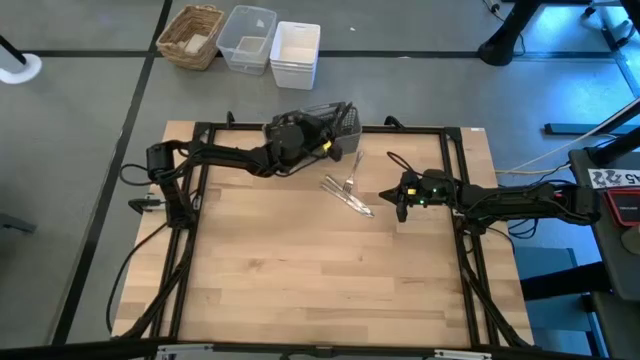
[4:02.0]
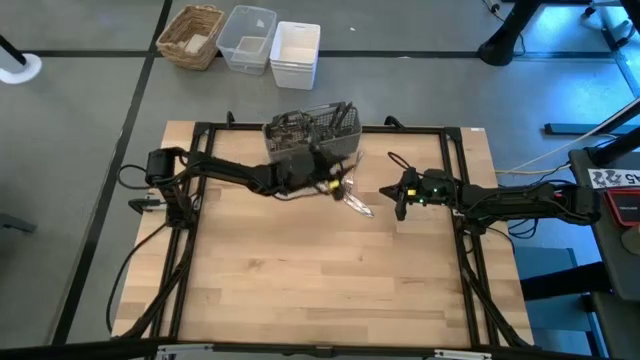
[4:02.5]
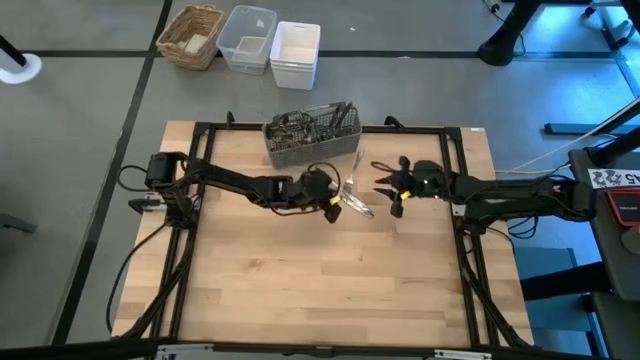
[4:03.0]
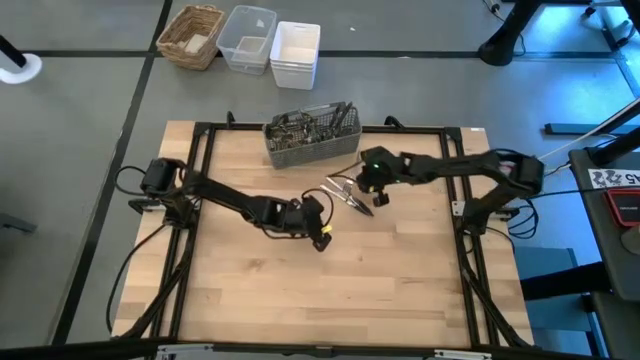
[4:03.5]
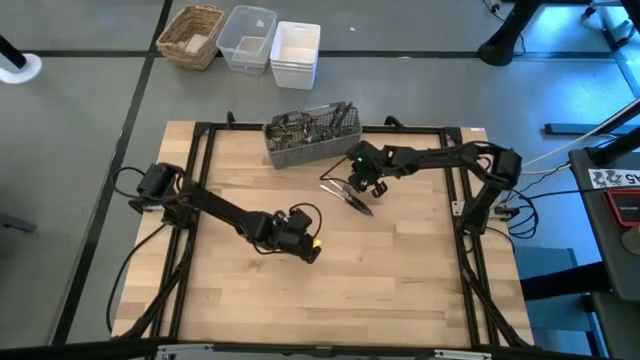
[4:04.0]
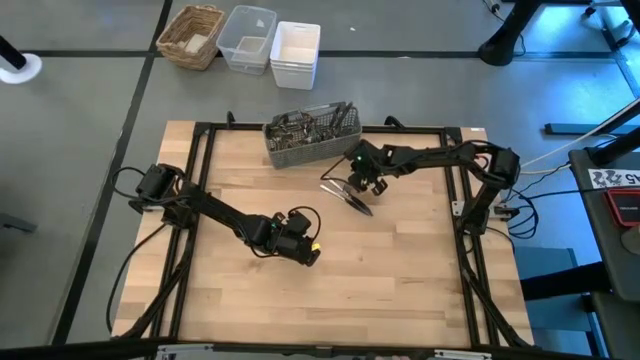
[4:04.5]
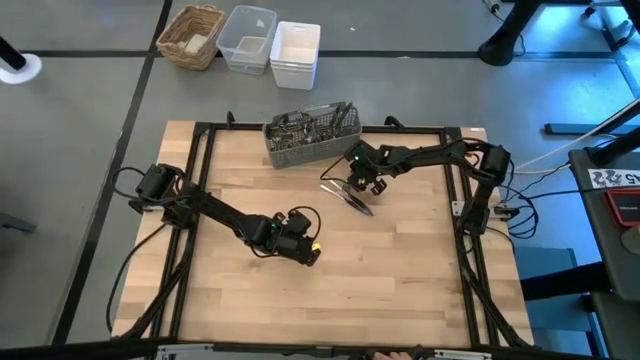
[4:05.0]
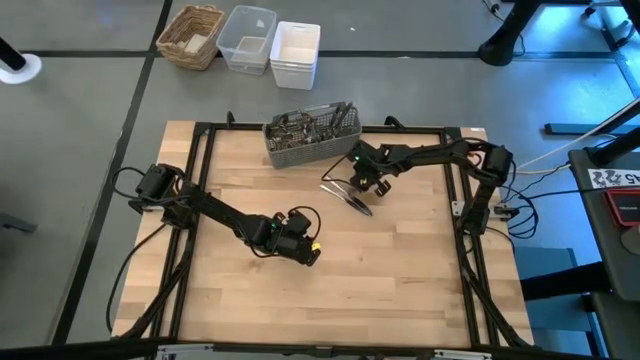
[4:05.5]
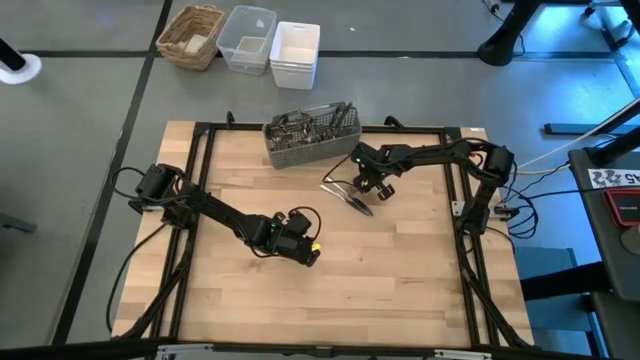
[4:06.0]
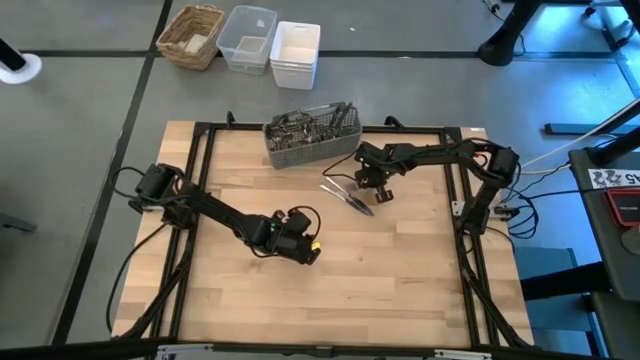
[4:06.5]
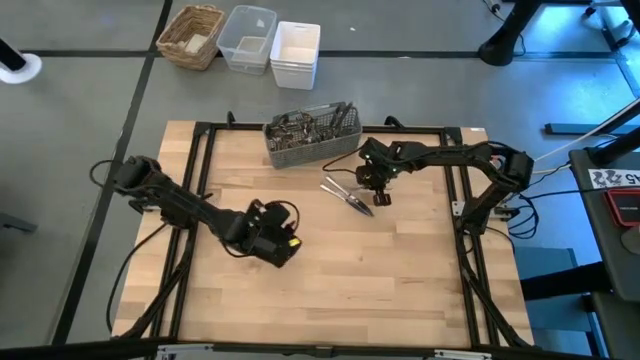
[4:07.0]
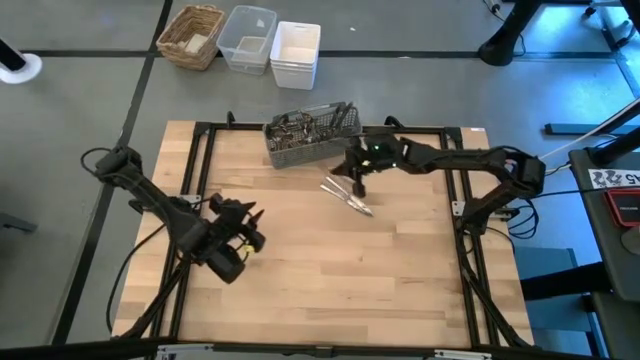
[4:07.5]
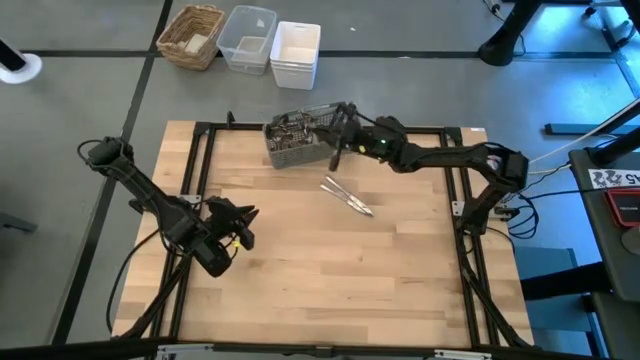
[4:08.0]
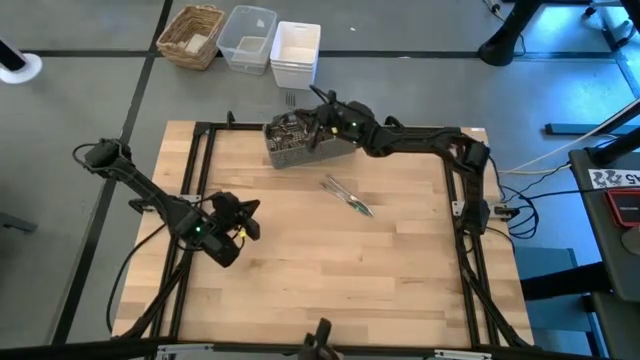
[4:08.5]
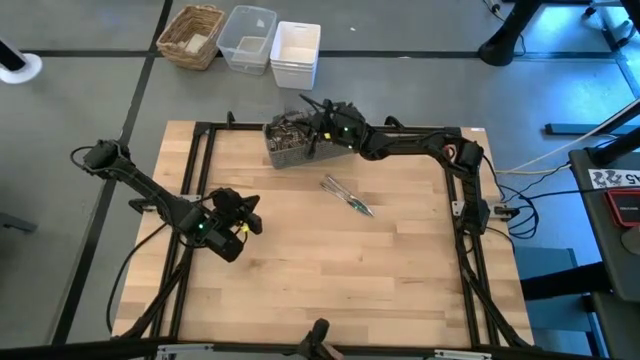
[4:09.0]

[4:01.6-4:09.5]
Task: Sort silverware
Put the silver fork into the silverware rack

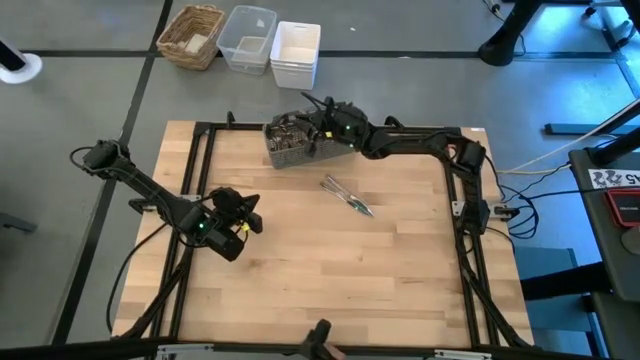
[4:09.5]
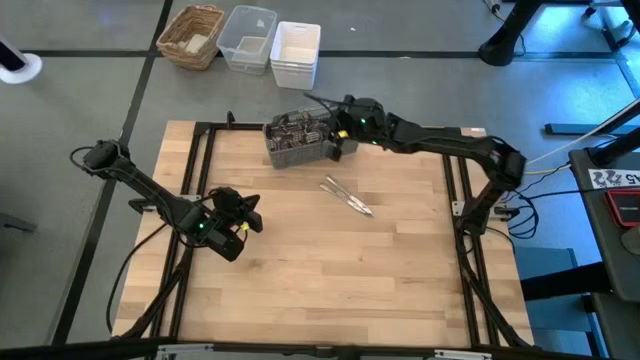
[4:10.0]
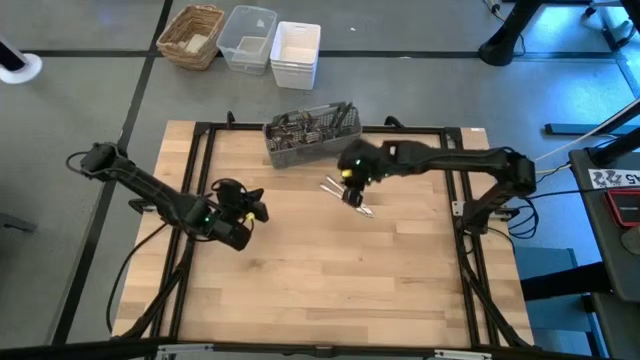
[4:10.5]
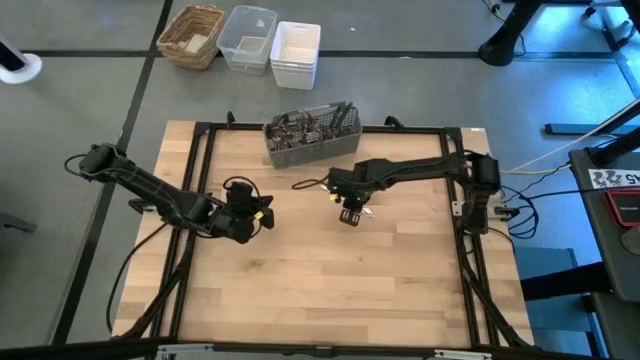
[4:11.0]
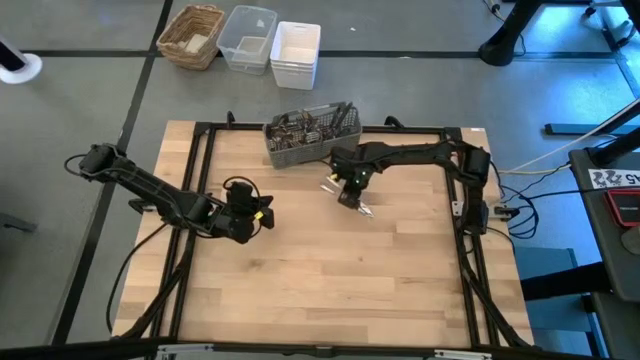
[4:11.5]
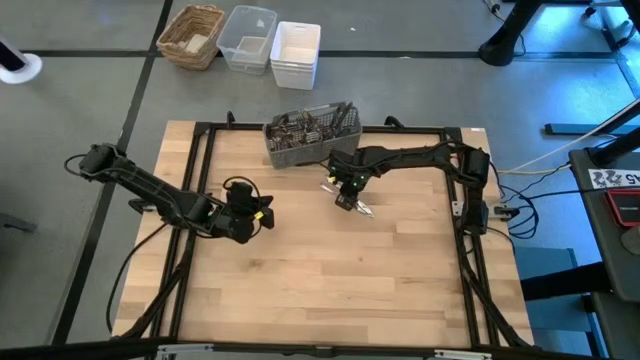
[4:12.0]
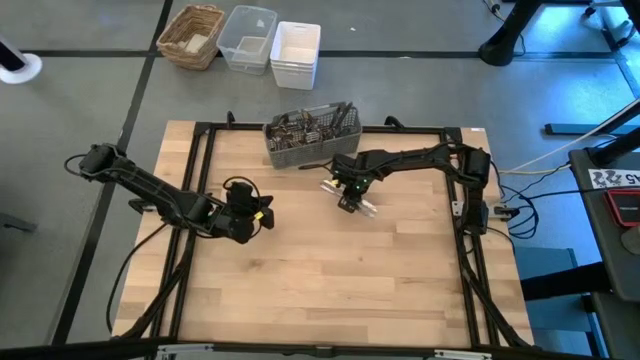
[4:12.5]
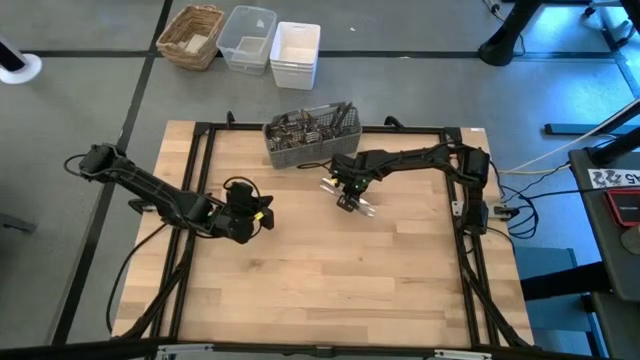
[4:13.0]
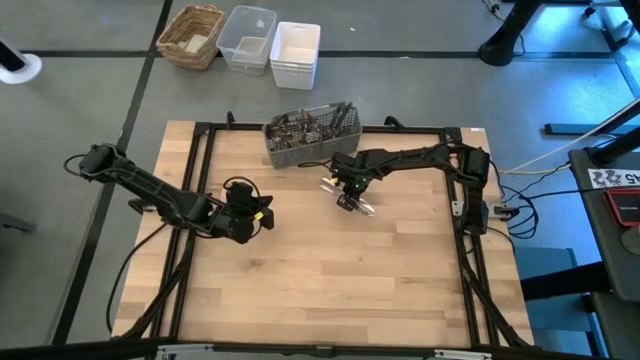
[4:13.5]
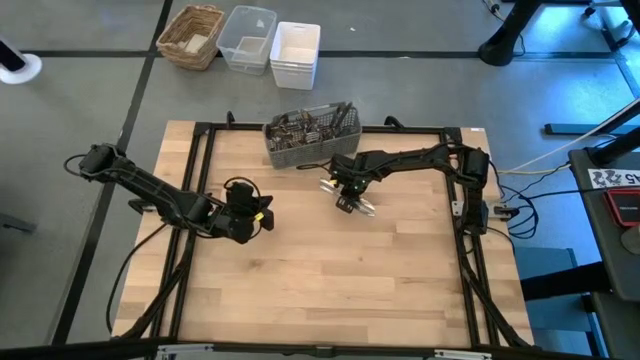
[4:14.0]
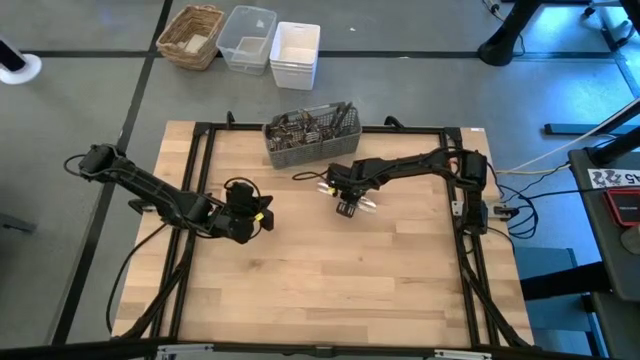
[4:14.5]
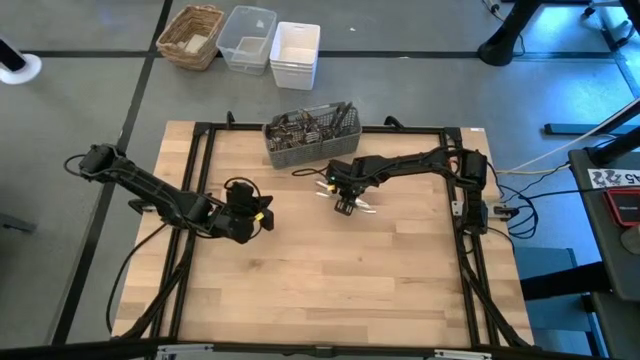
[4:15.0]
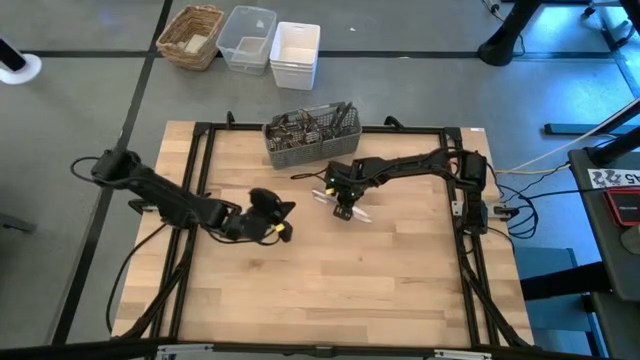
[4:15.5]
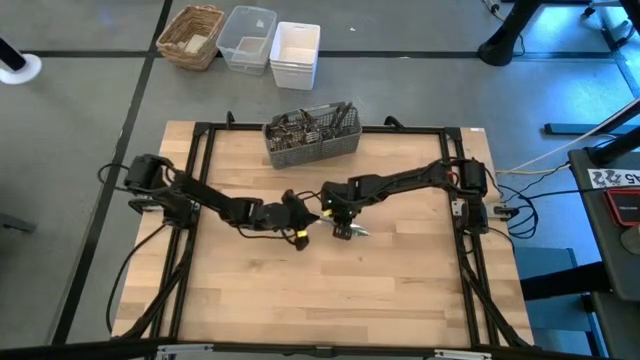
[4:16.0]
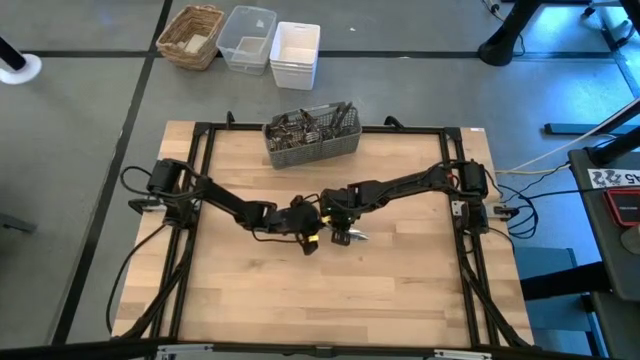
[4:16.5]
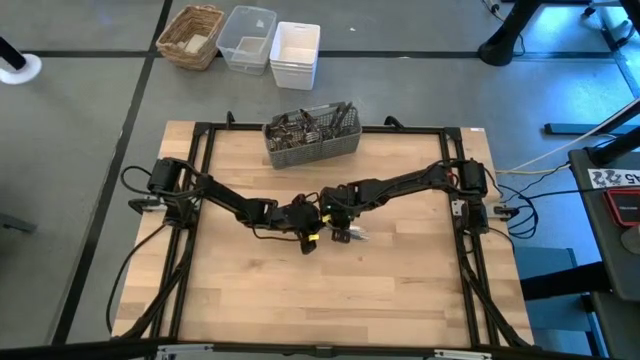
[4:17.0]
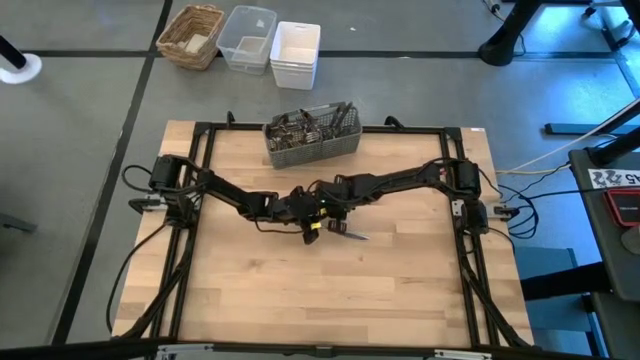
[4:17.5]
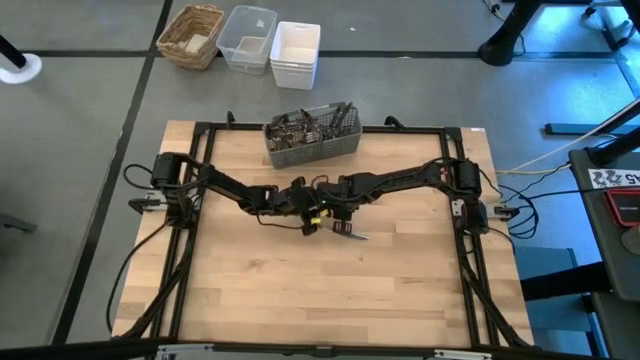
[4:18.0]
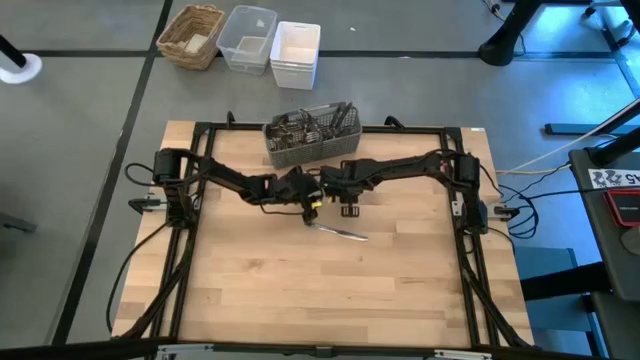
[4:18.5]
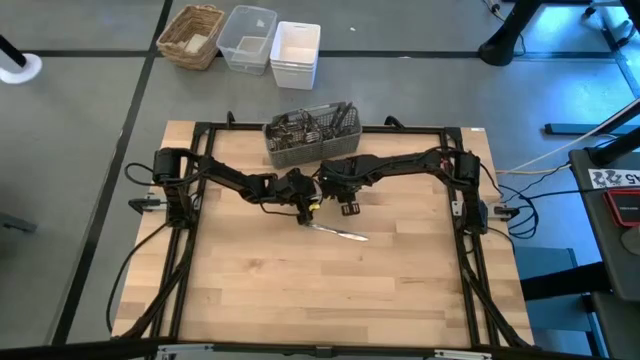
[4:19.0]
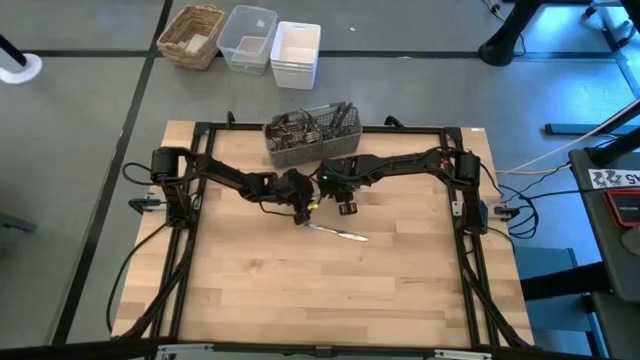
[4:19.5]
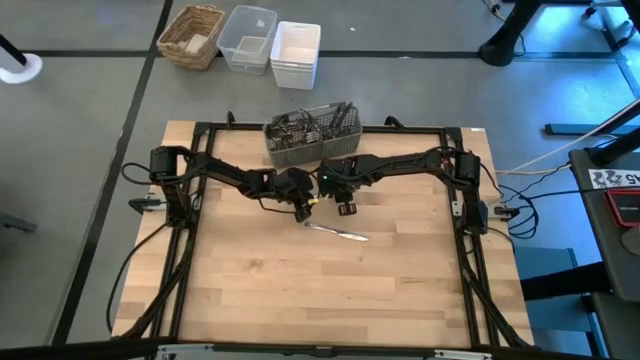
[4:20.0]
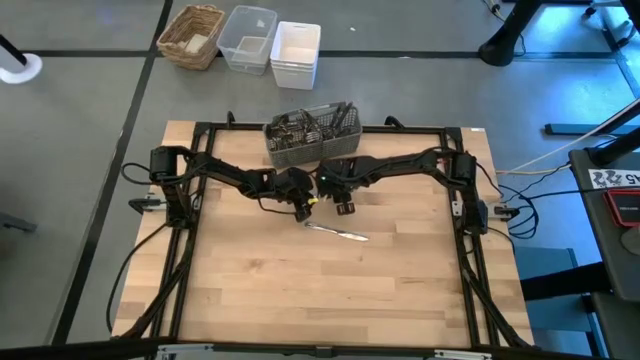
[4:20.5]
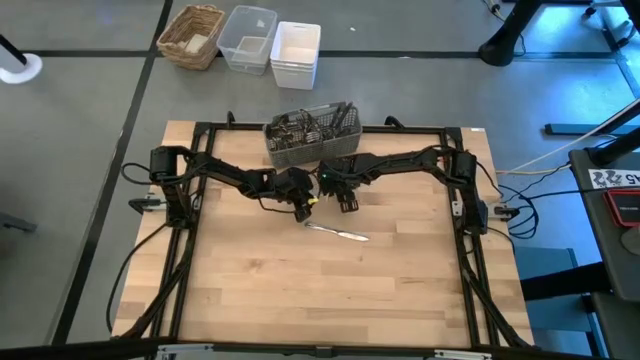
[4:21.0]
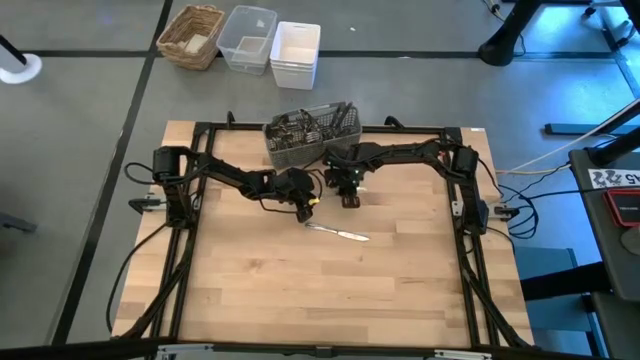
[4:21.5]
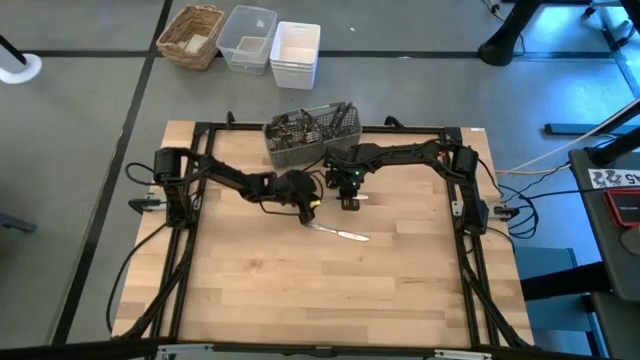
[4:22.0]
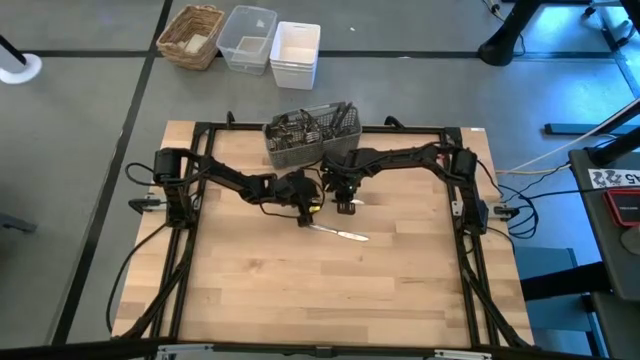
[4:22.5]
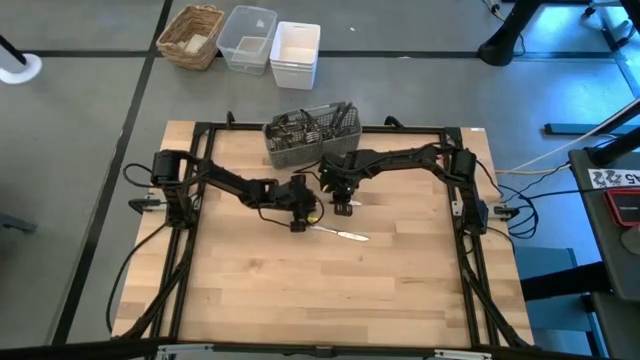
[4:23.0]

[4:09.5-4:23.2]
Put the silver knife into the silverware rack

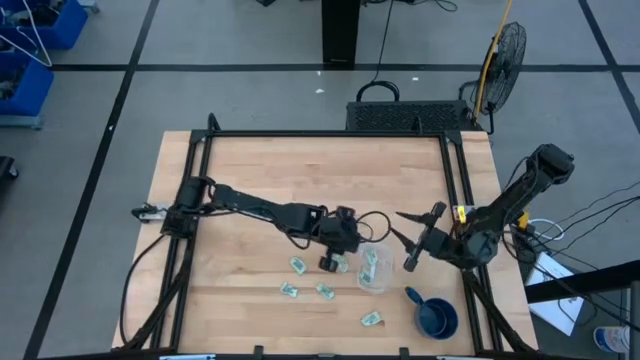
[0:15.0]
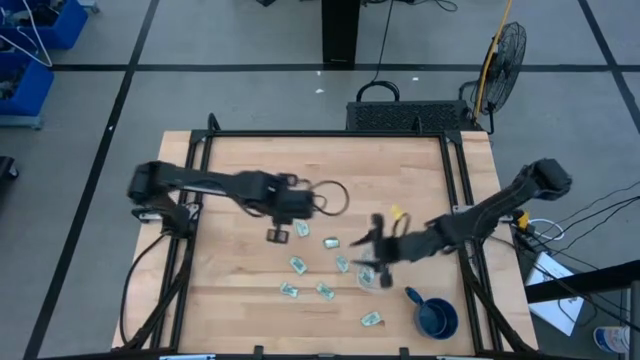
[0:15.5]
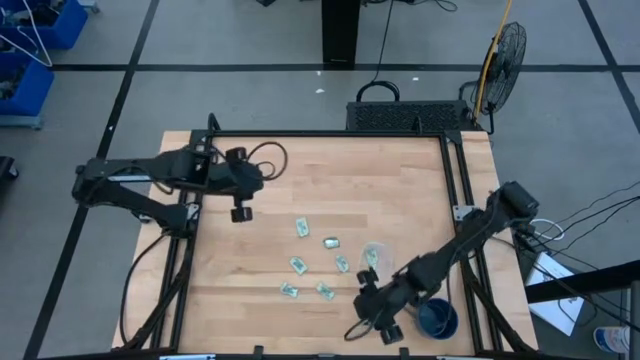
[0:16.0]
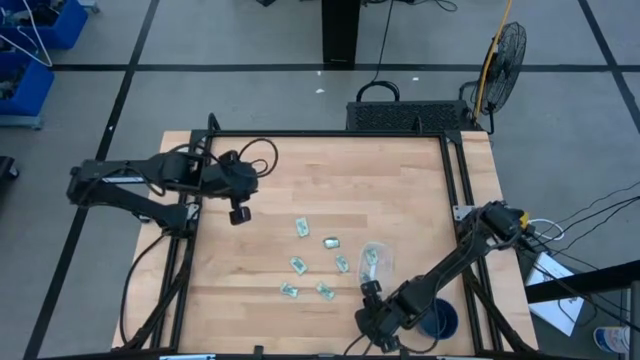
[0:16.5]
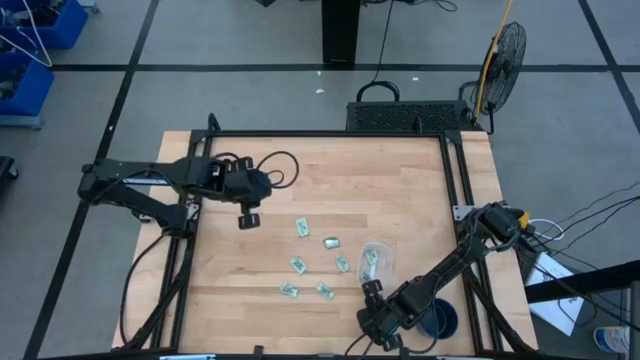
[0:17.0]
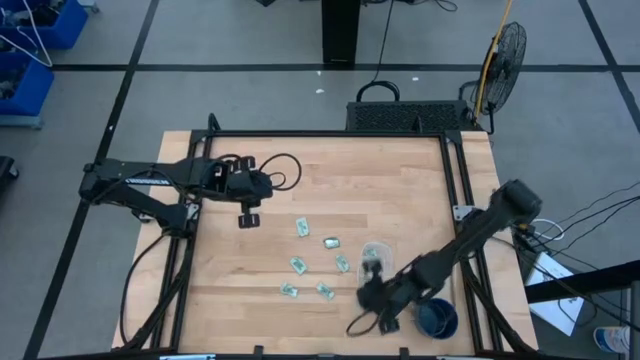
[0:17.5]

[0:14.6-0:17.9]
Task: Pick and place Stevia / Truvia into bins
Put the stevia packet into the transparent container
